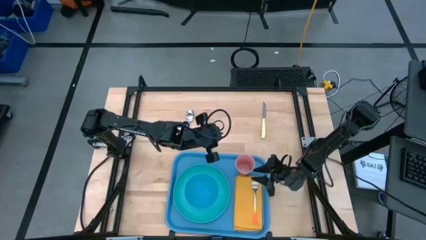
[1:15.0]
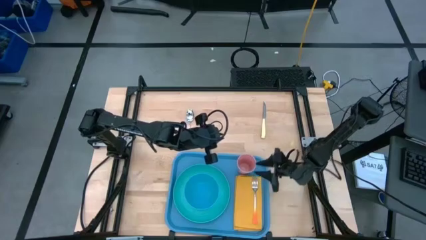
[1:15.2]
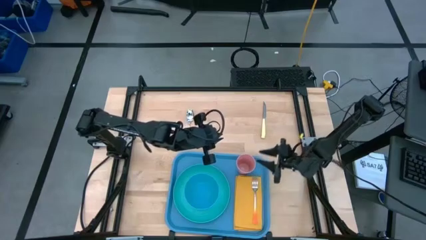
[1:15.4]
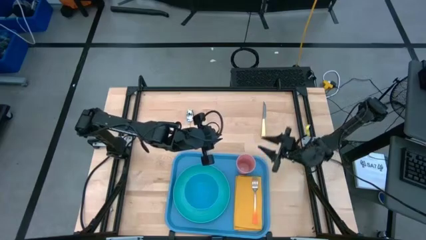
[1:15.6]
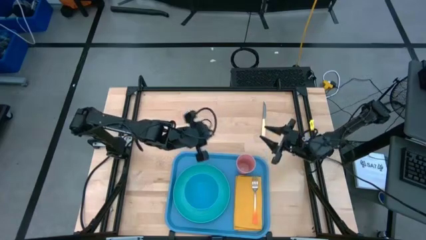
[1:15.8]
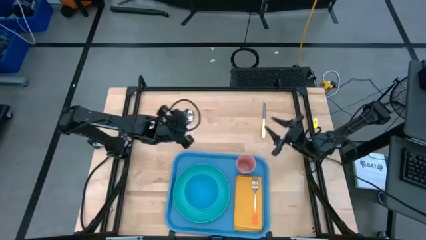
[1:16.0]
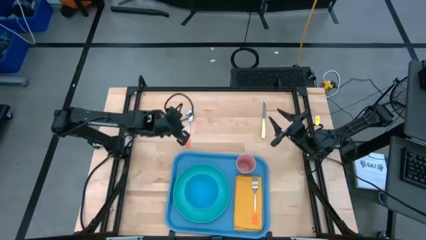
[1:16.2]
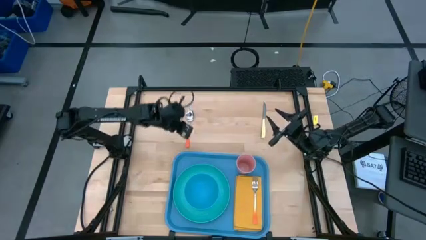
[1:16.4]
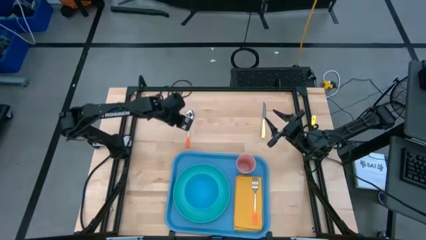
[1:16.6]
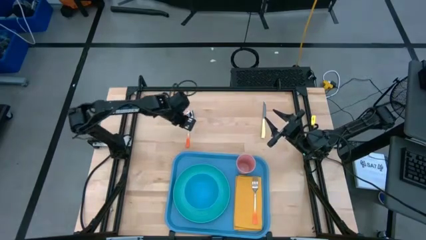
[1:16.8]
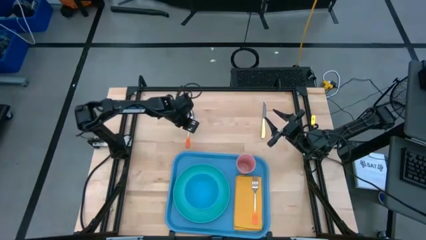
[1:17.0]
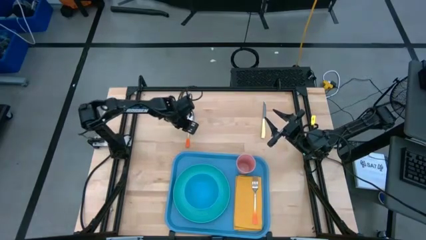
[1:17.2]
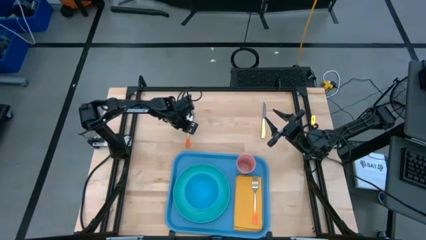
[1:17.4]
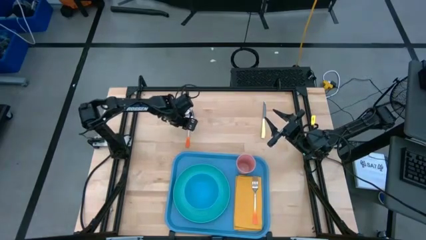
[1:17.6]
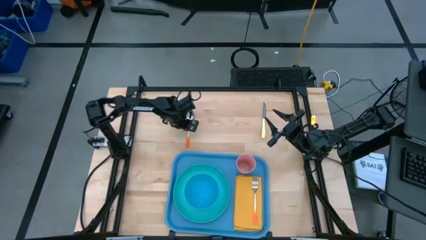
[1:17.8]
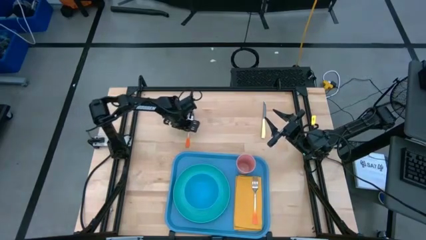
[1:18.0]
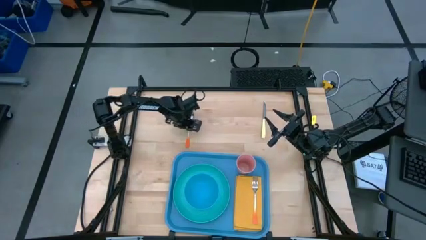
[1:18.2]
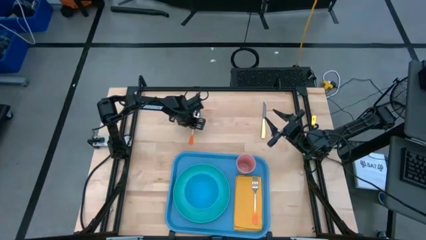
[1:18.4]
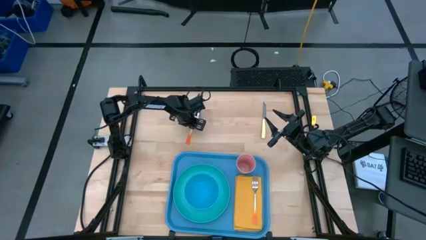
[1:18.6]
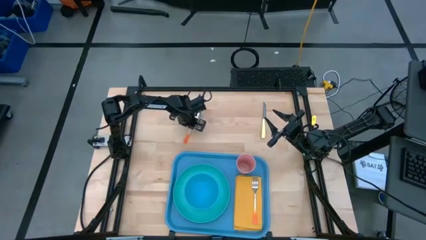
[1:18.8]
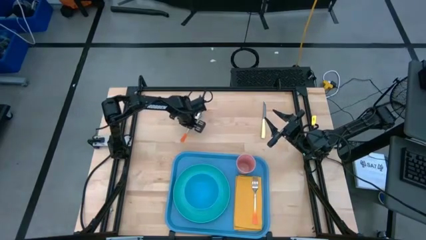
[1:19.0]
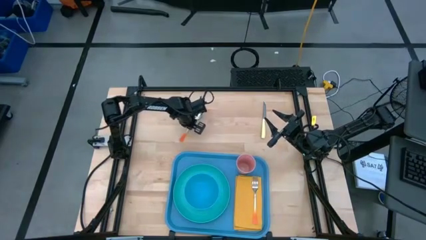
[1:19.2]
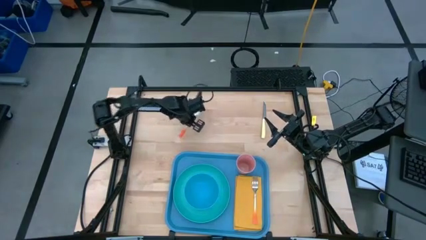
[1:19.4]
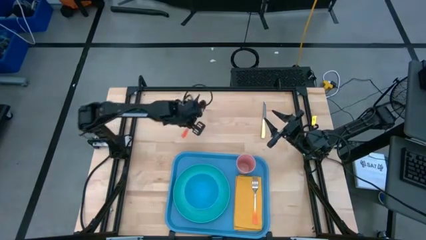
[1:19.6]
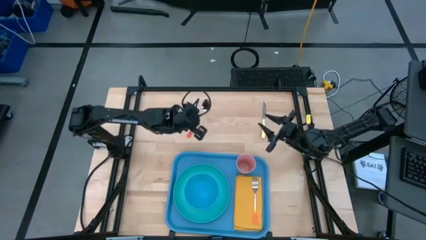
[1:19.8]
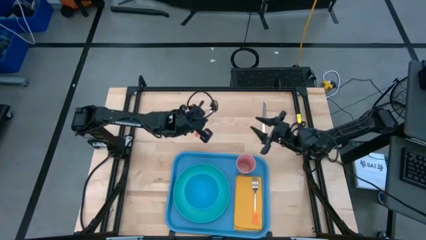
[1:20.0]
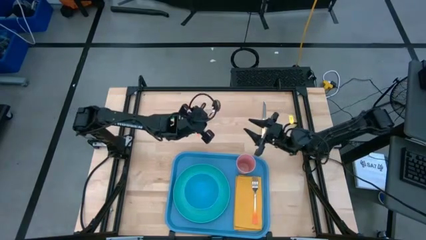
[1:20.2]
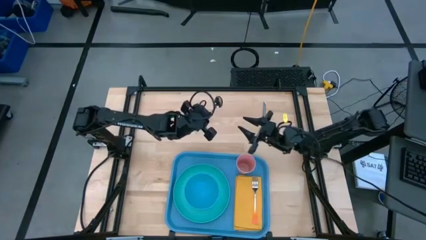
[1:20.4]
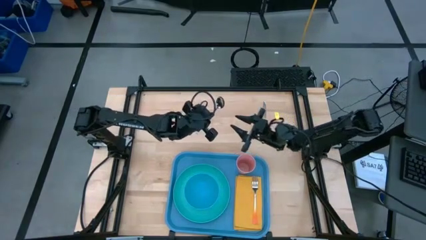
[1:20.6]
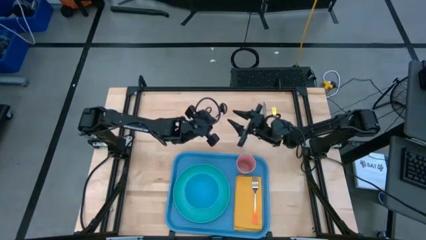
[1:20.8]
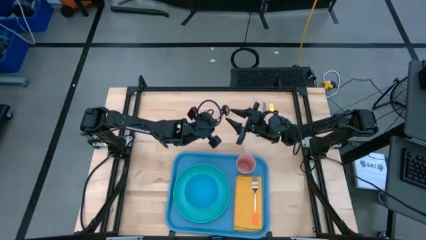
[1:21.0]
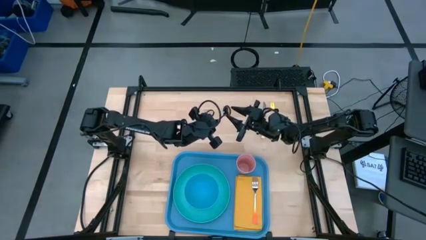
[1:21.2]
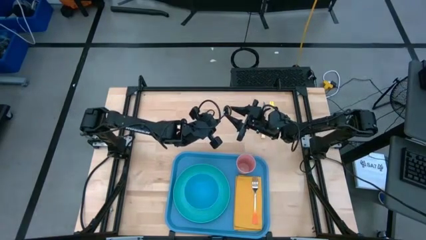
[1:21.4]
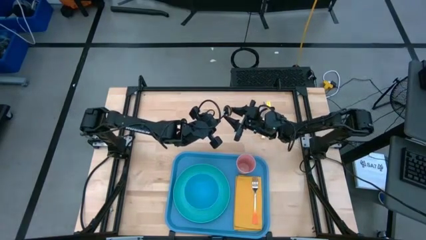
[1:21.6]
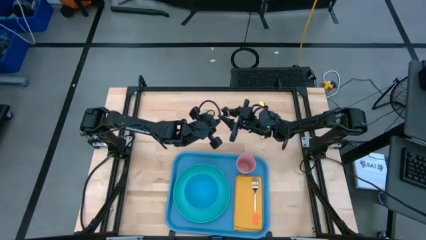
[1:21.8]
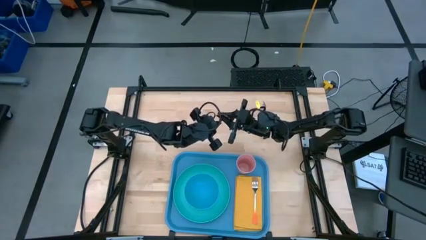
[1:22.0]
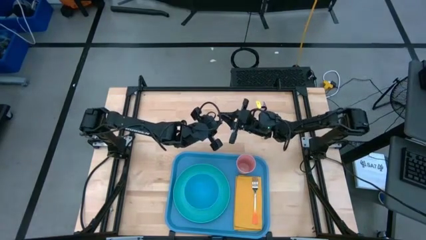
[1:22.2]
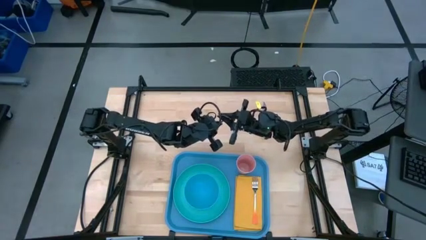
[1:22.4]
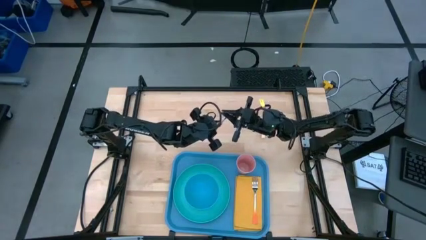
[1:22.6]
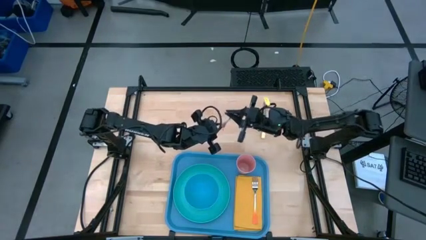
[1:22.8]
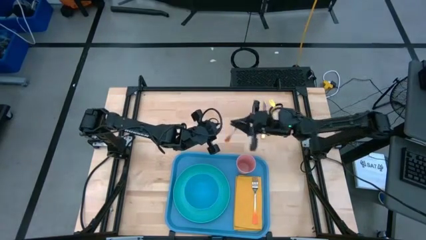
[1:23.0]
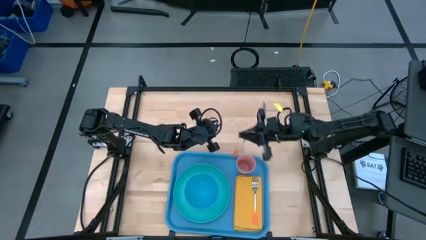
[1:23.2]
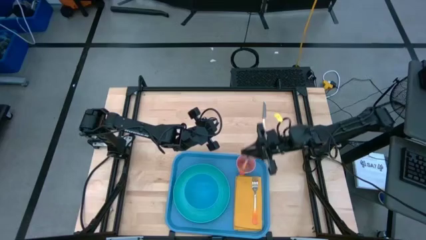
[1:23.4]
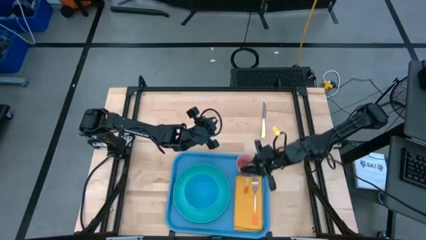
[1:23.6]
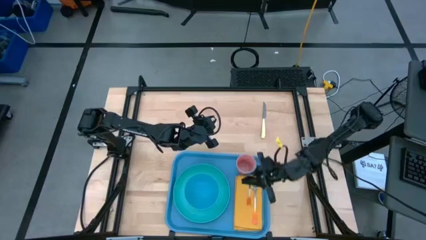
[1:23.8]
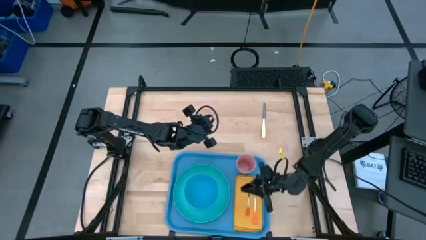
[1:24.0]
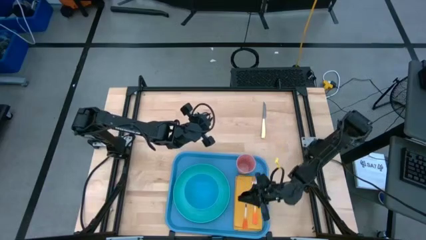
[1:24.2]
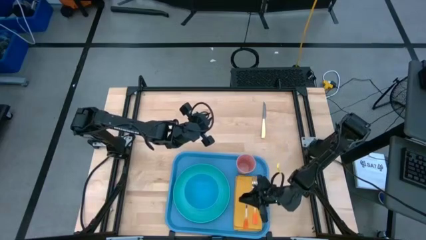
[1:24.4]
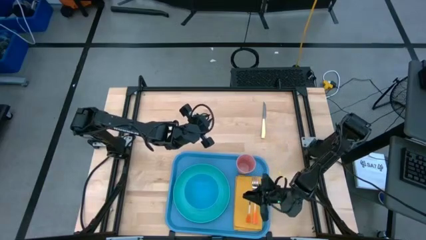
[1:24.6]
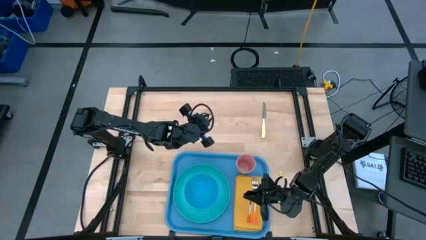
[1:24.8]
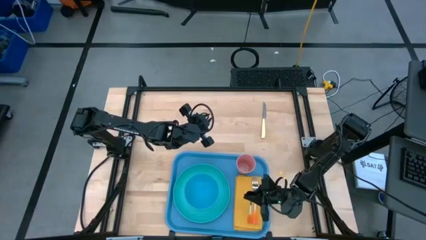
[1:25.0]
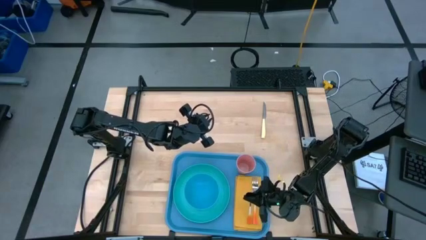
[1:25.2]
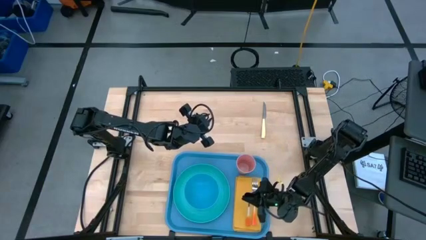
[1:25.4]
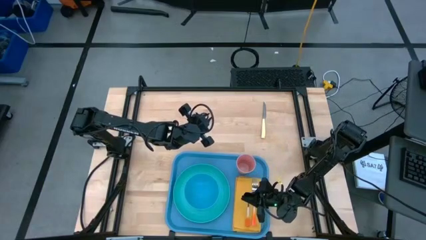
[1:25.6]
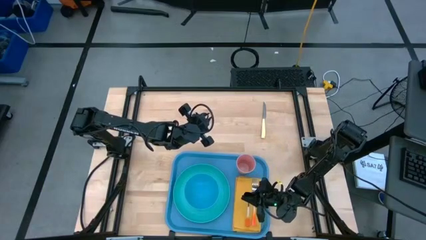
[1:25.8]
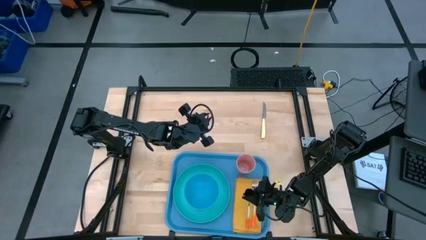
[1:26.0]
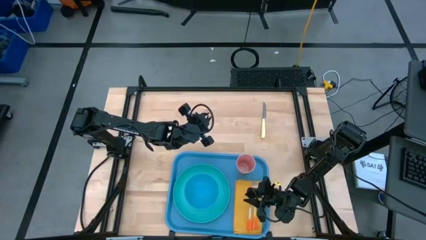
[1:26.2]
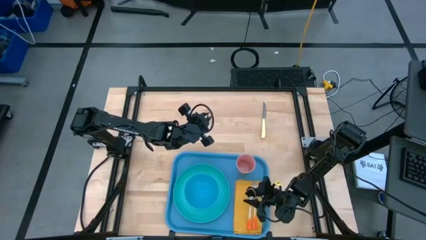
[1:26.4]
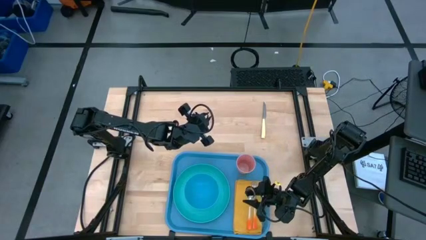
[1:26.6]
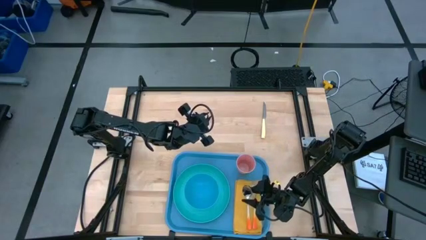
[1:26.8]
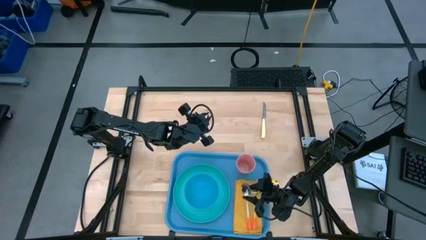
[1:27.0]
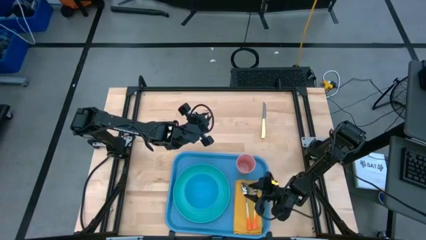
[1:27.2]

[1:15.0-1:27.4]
Task: Set up tray
Put the orange spoon on the yellow napkin to the left of the orange fork

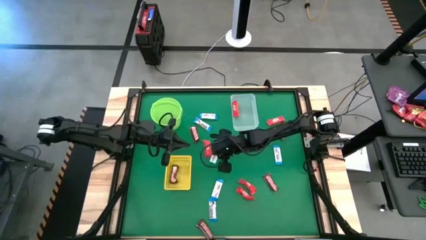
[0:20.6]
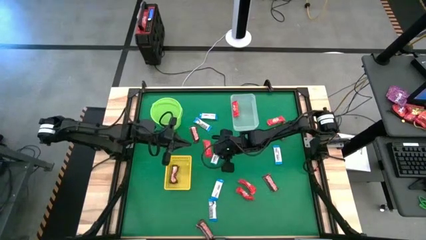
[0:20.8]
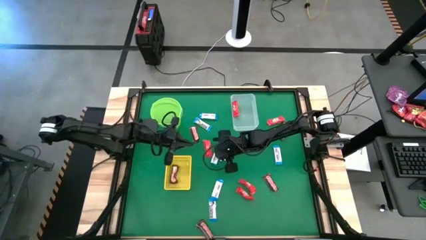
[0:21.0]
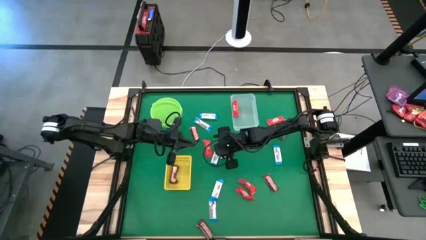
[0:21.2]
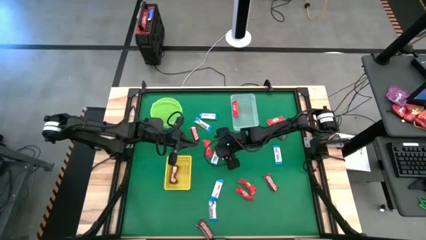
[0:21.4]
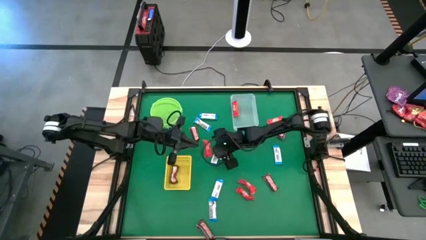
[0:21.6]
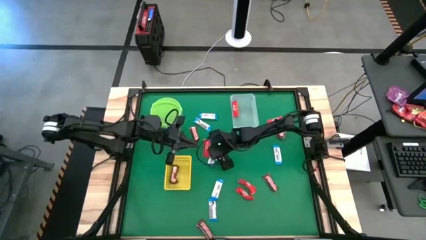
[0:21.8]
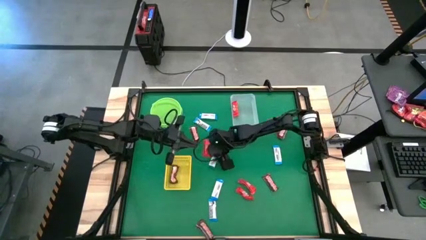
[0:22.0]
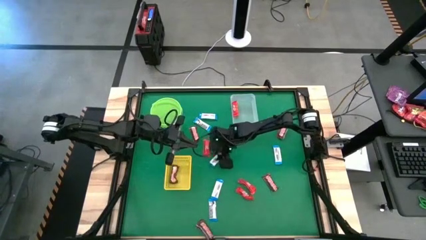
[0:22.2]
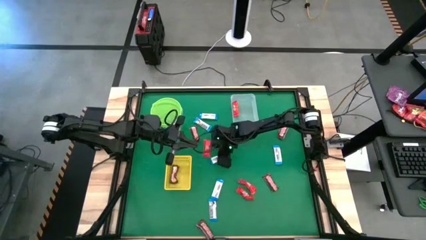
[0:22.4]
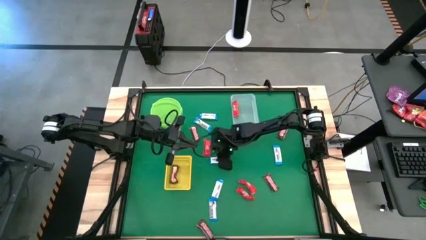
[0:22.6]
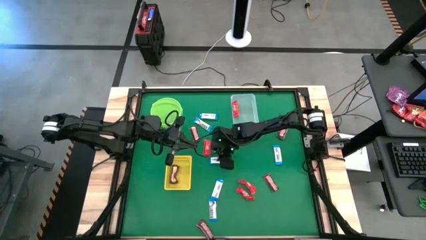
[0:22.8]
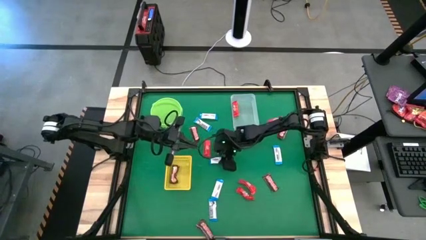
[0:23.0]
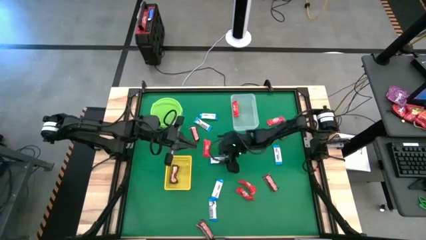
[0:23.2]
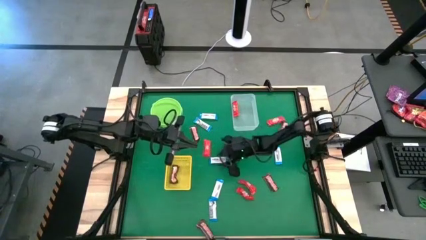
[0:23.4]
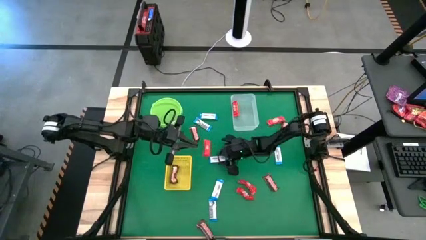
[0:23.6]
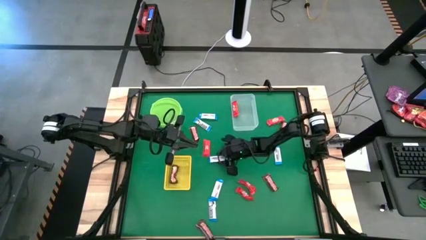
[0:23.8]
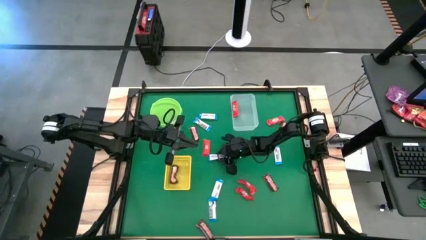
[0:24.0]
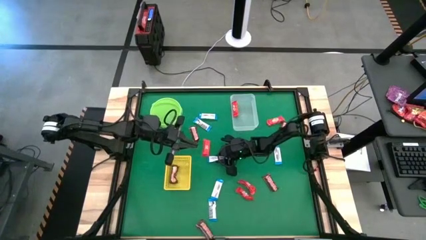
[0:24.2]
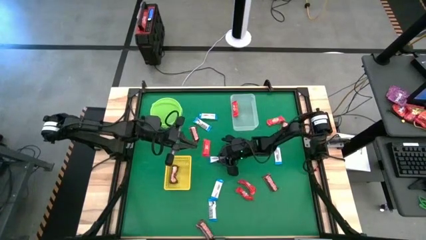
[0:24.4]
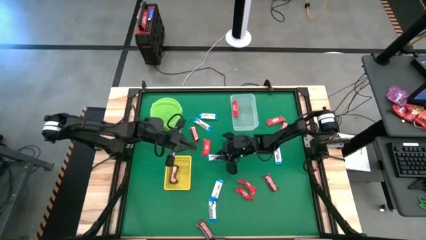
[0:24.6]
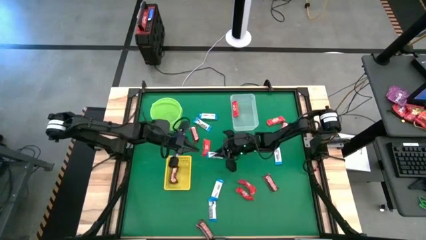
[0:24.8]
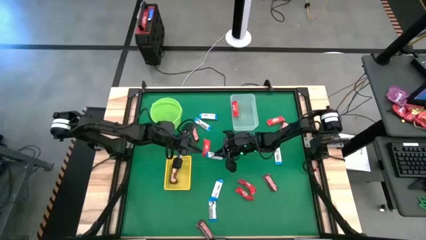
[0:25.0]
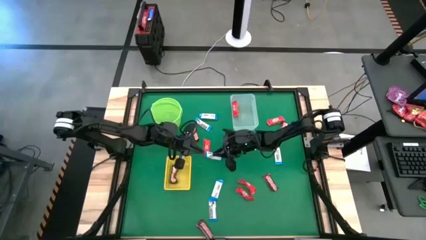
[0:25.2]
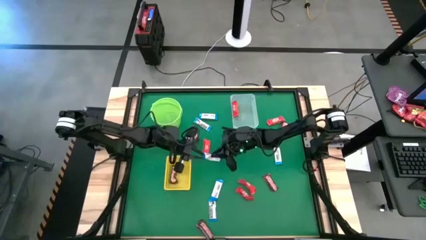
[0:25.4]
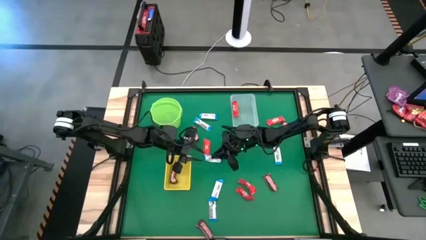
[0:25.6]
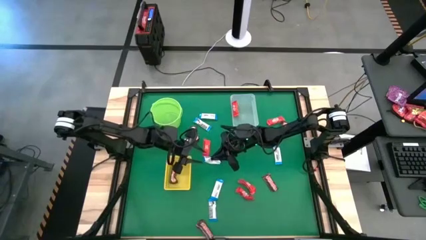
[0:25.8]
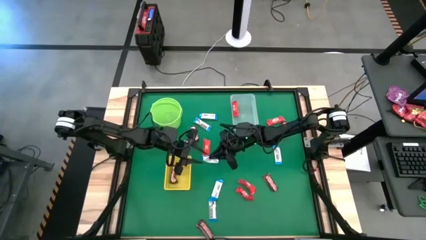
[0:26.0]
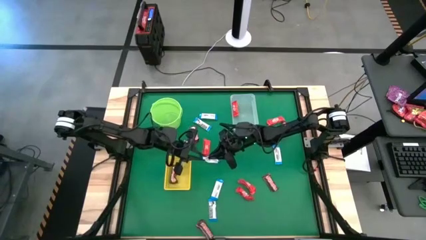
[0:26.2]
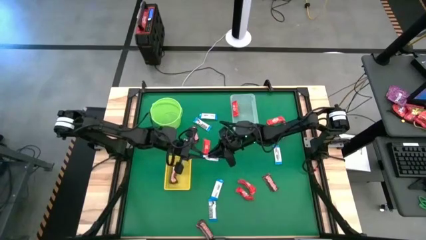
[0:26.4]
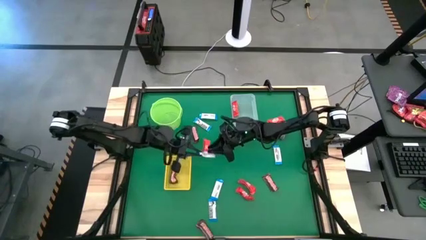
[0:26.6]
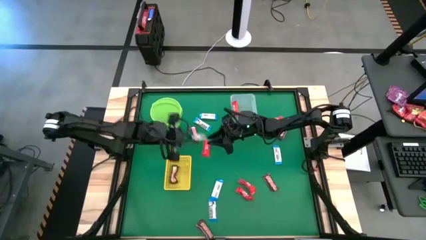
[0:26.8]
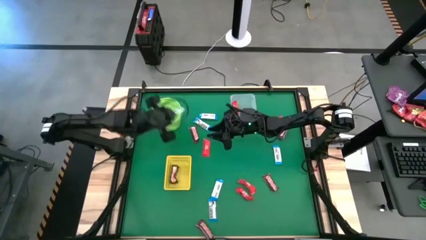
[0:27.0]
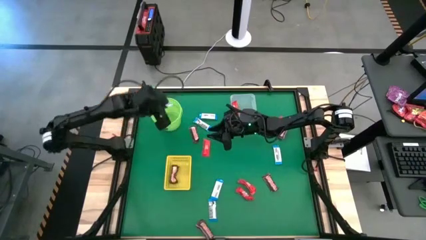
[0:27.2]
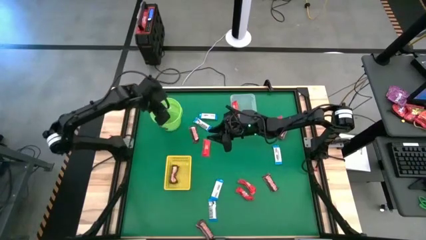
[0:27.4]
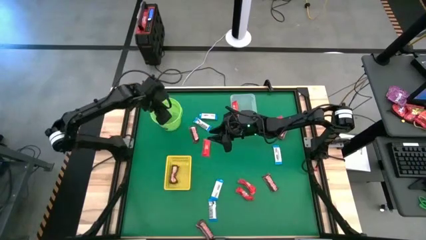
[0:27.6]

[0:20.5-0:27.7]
Task: Sort candy by brand, put in halloween buckets
Put the white chocolate into the green bucket
